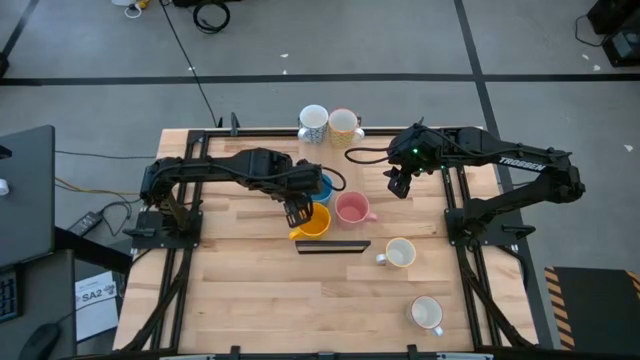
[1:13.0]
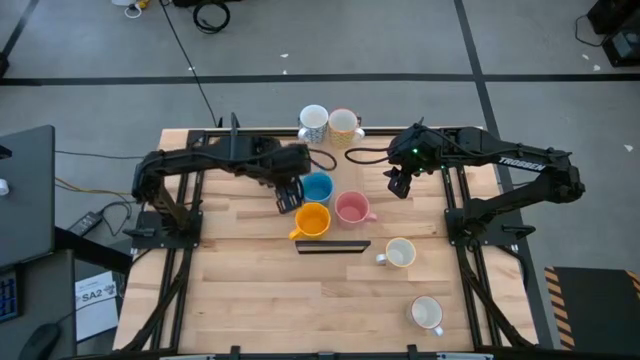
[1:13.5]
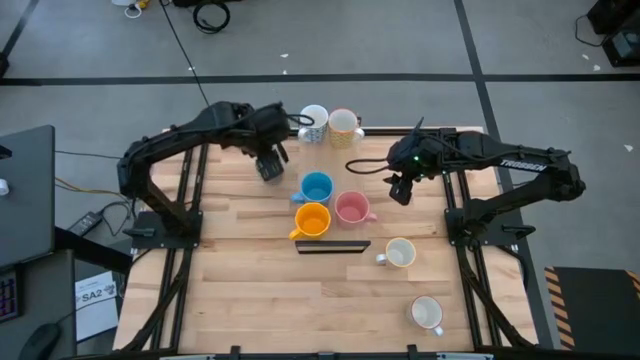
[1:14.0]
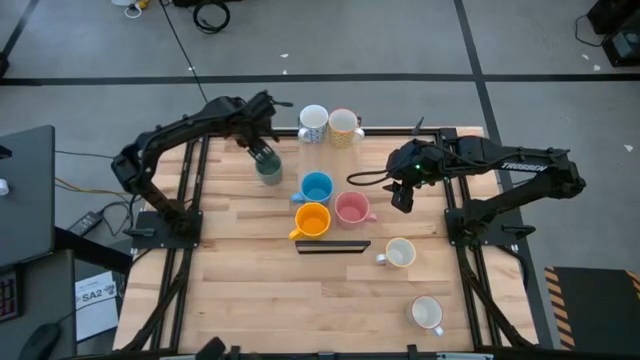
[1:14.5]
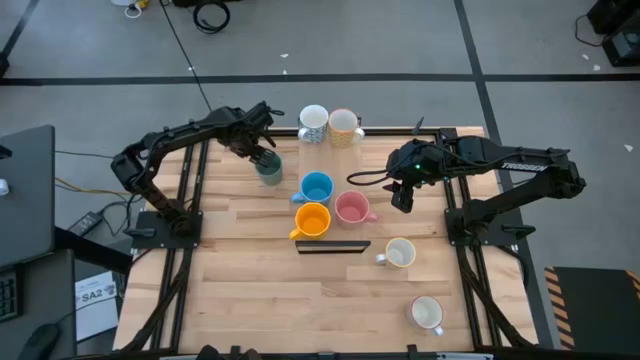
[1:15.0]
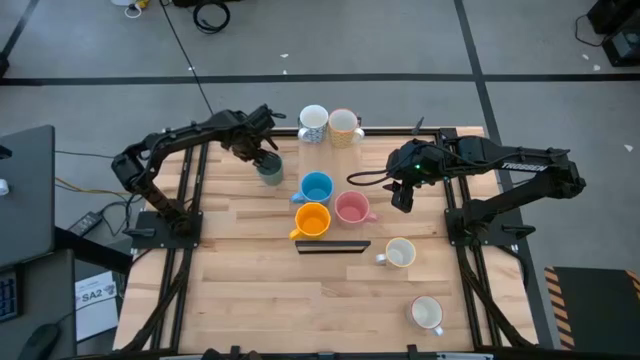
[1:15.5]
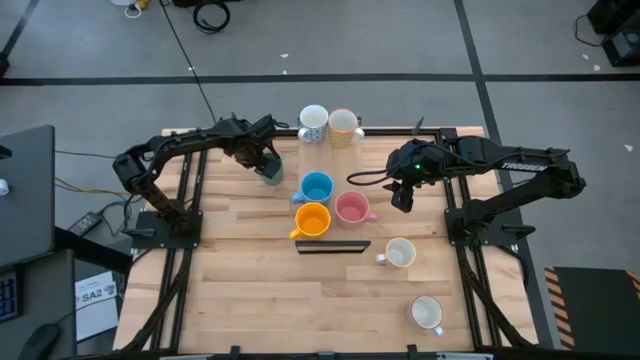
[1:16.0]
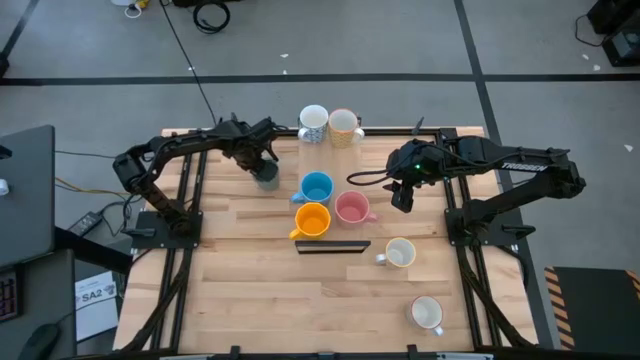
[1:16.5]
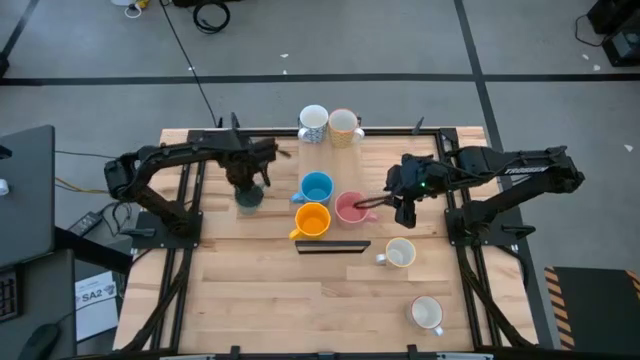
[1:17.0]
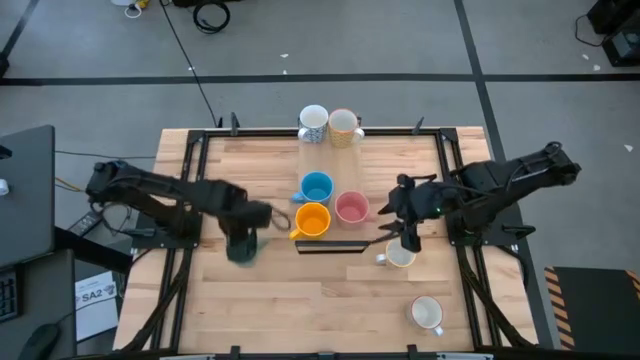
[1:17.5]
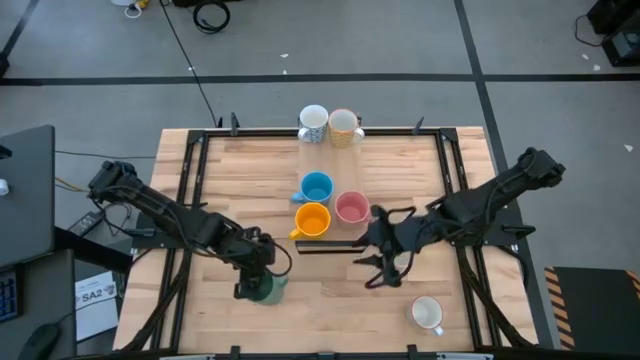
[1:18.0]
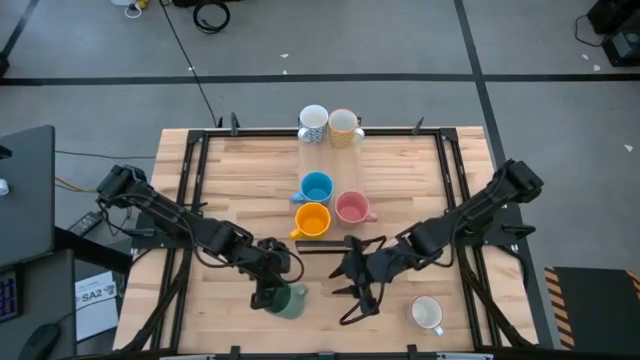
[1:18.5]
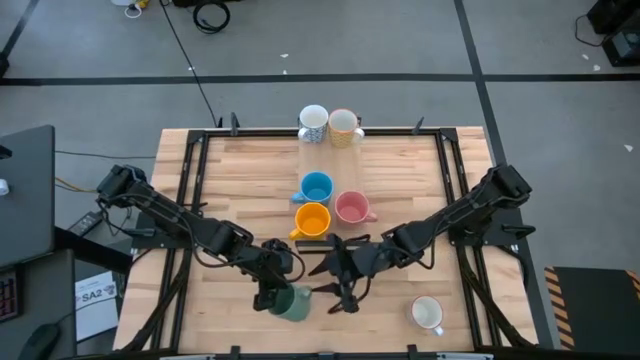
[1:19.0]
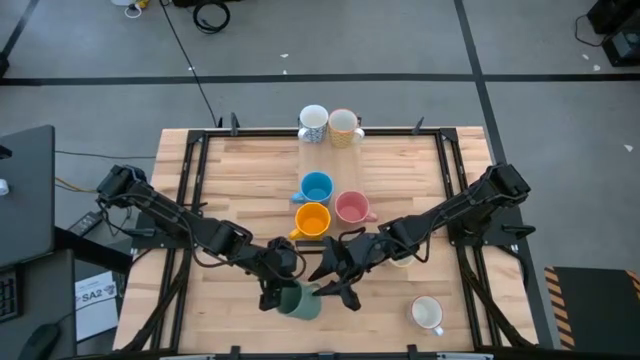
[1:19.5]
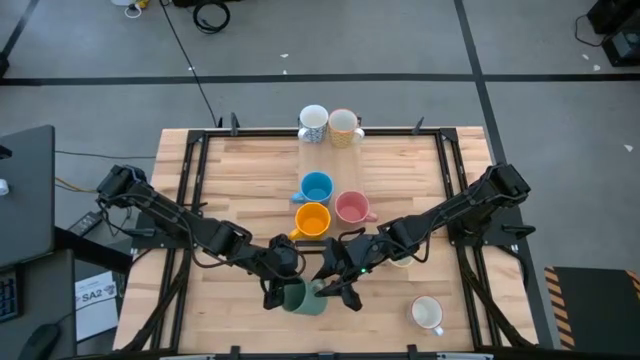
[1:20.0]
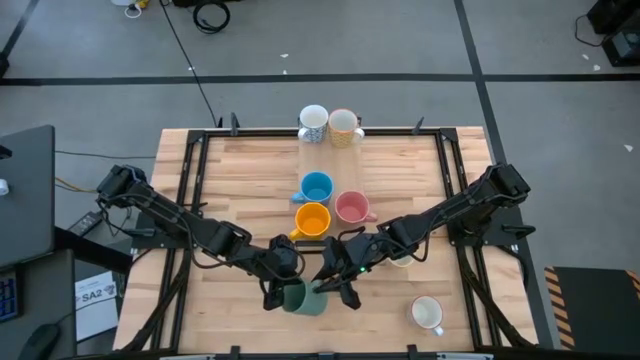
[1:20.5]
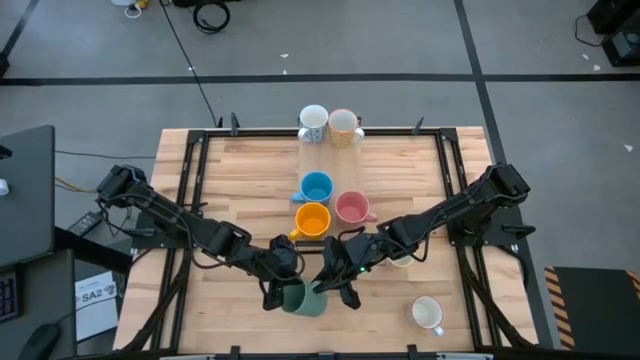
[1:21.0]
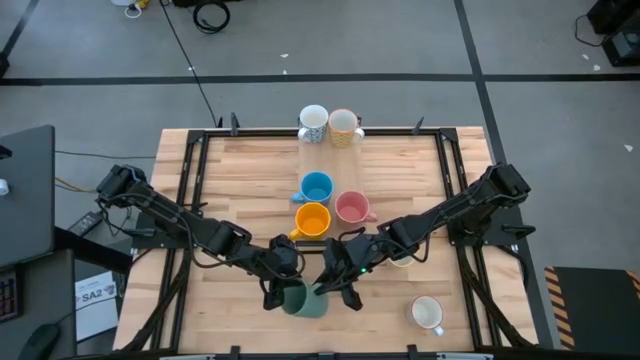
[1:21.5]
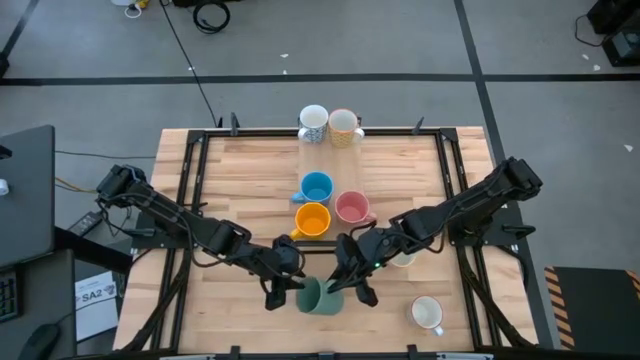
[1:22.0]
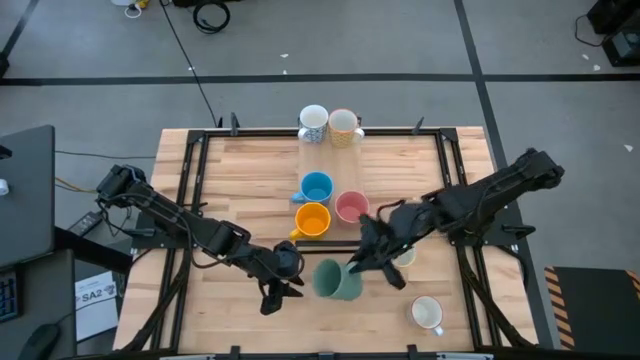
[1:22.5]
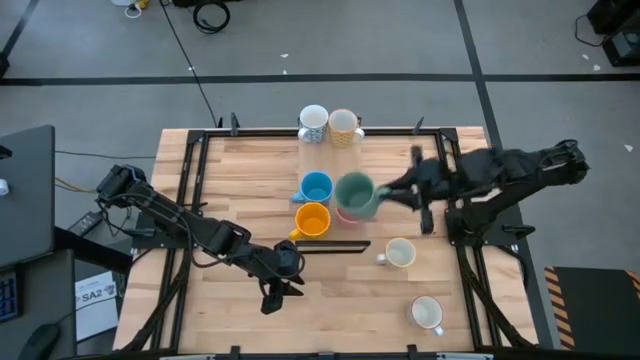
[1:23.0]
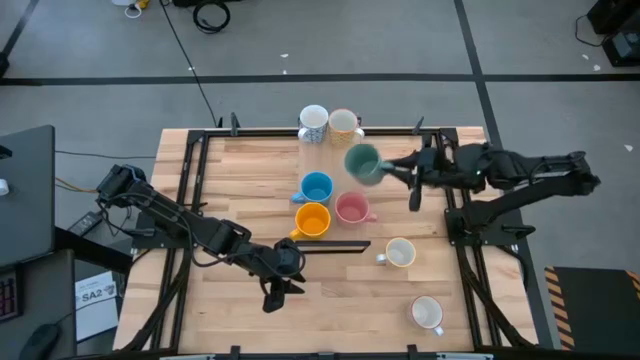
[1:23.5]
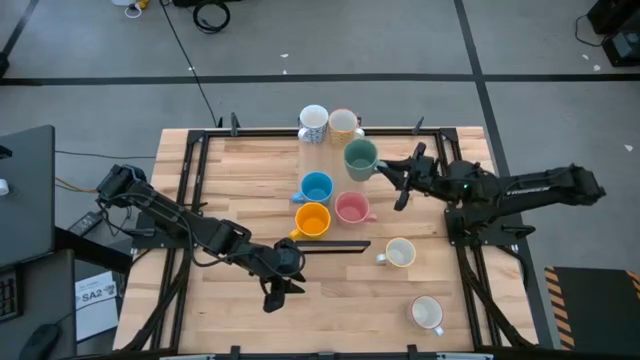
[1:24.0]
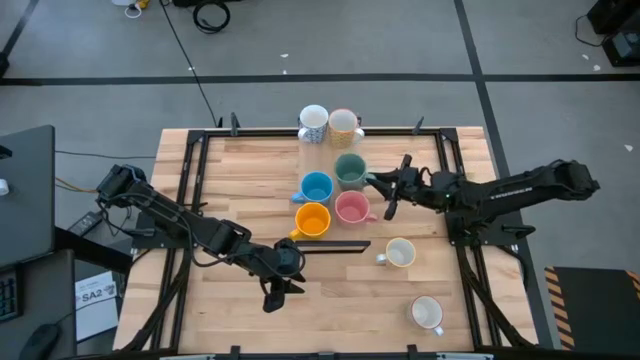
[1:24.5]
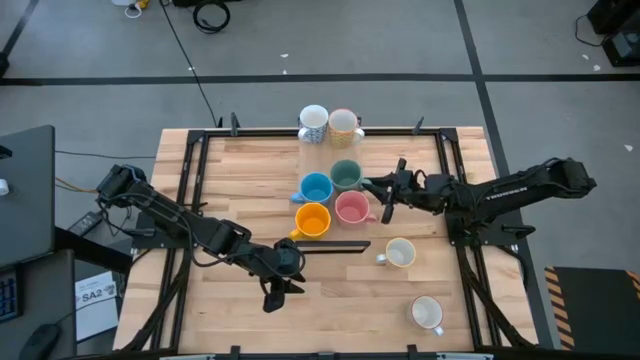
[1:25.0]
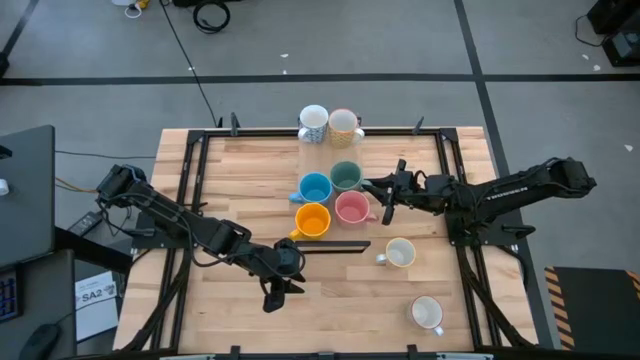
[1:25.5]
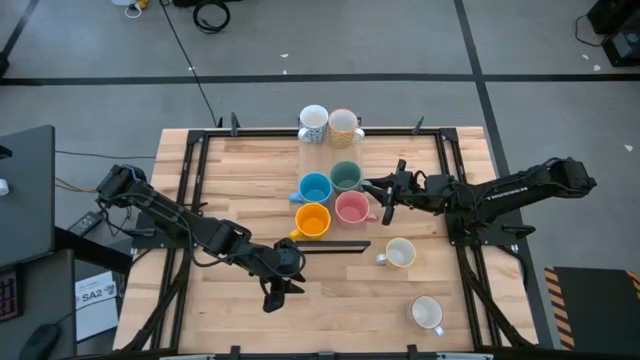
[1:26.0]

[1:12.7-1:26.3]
Task: Place coffee mugs
Put the green mug on the shelf

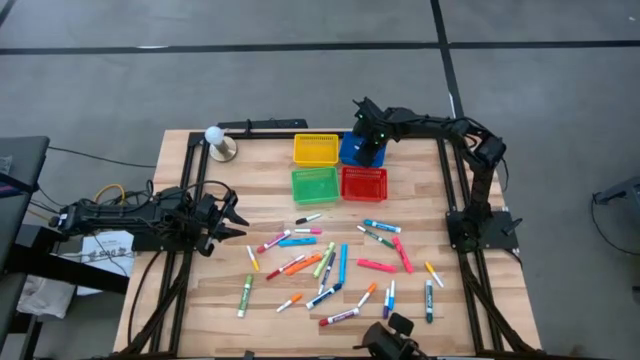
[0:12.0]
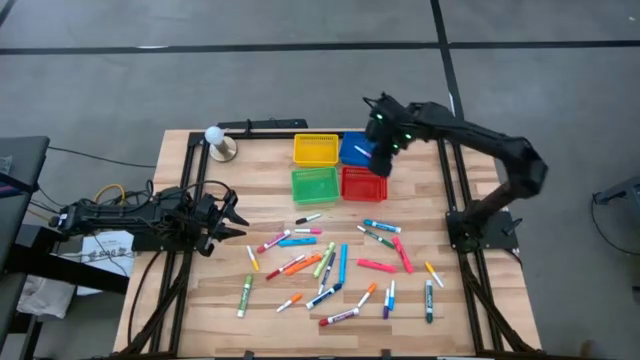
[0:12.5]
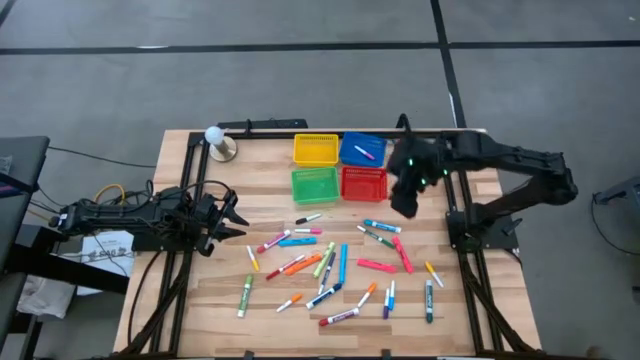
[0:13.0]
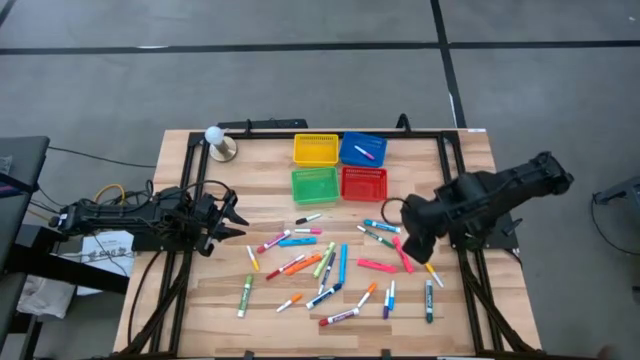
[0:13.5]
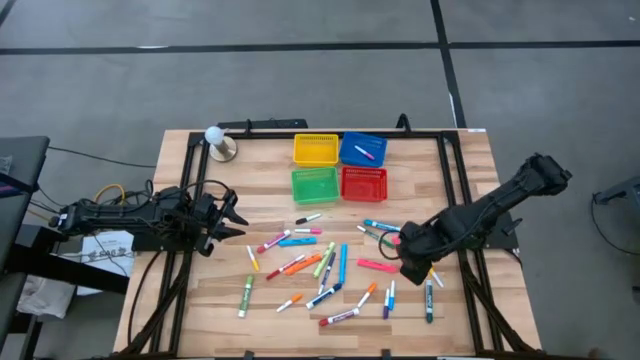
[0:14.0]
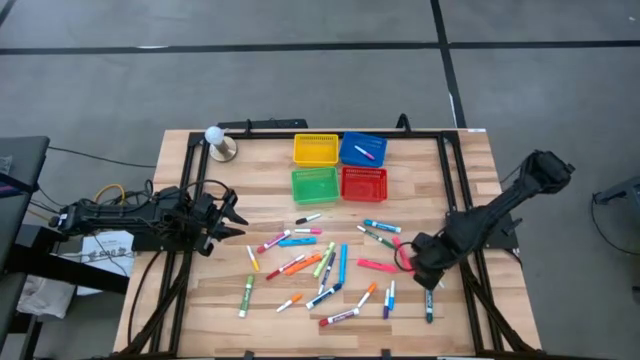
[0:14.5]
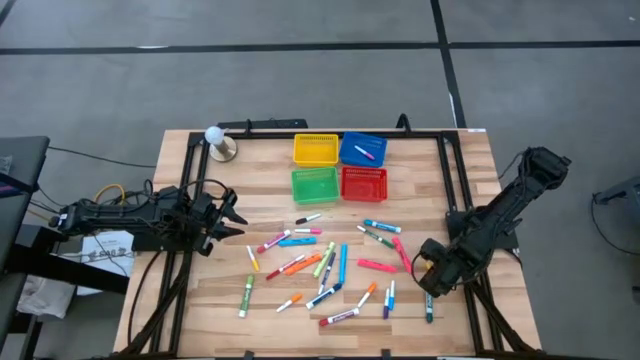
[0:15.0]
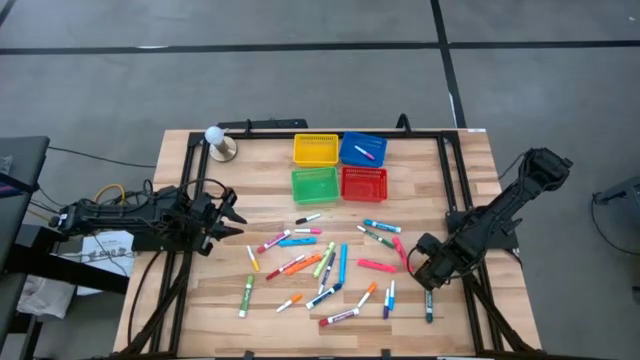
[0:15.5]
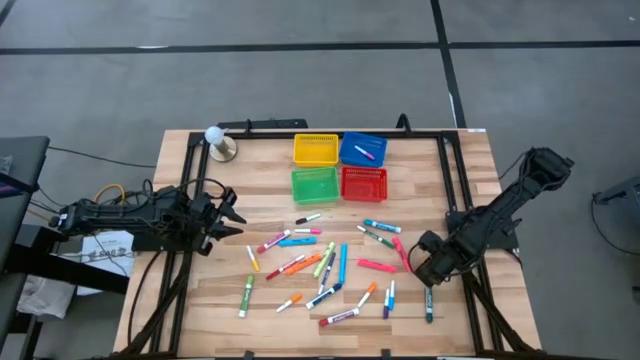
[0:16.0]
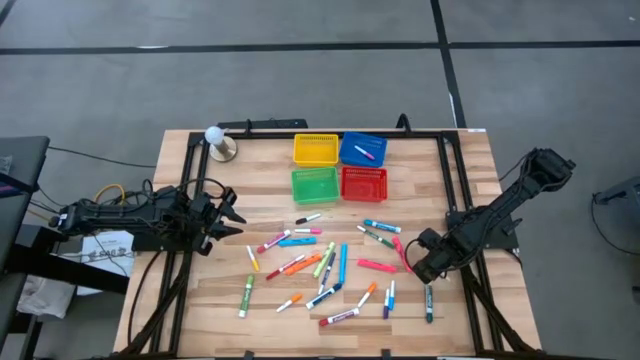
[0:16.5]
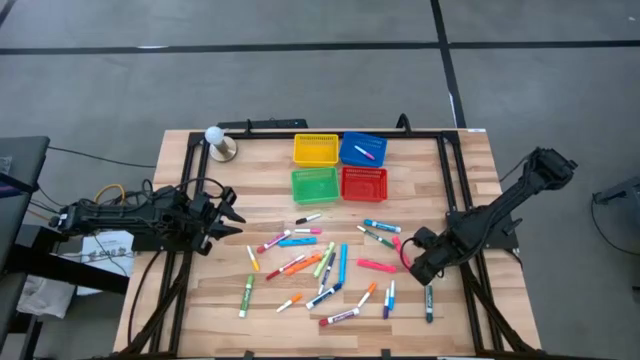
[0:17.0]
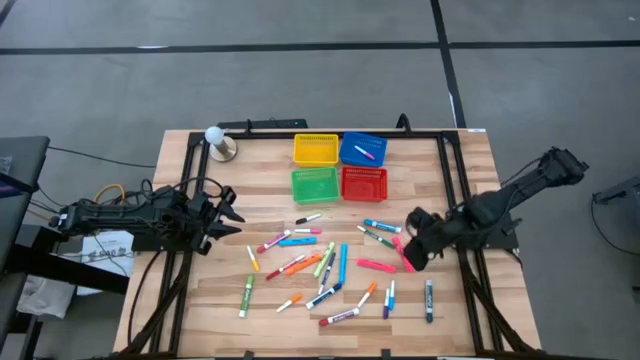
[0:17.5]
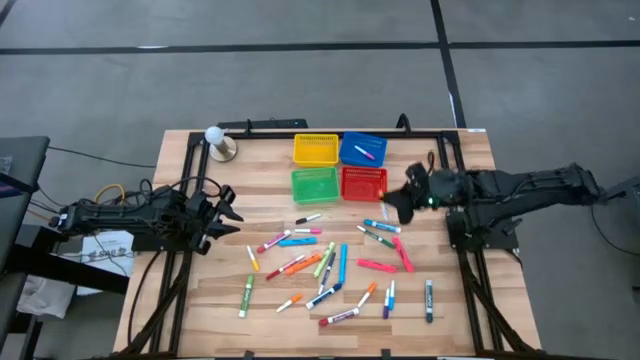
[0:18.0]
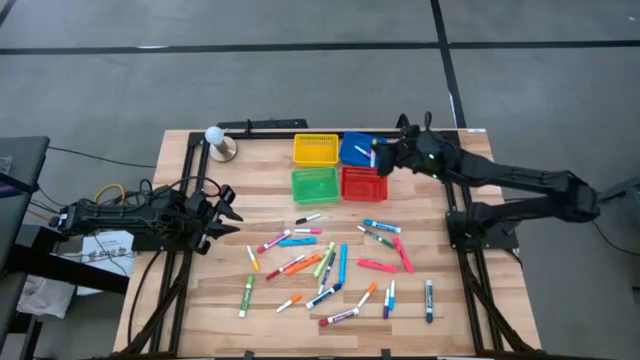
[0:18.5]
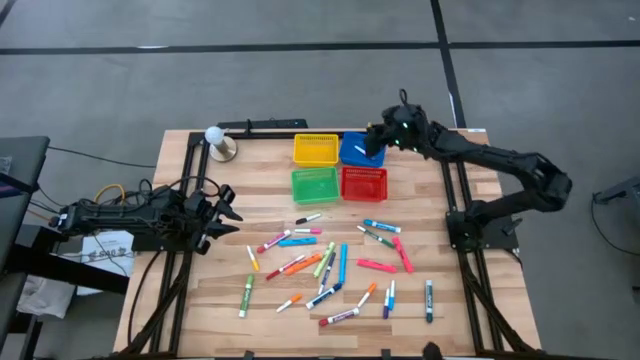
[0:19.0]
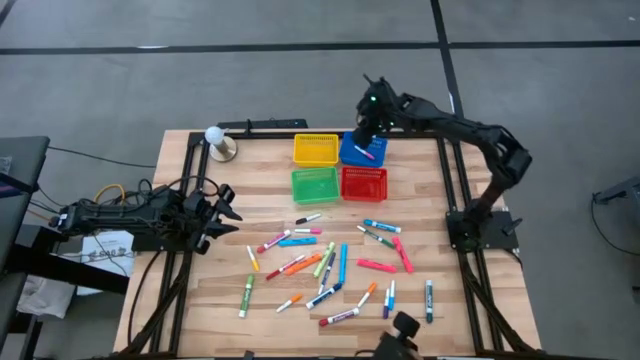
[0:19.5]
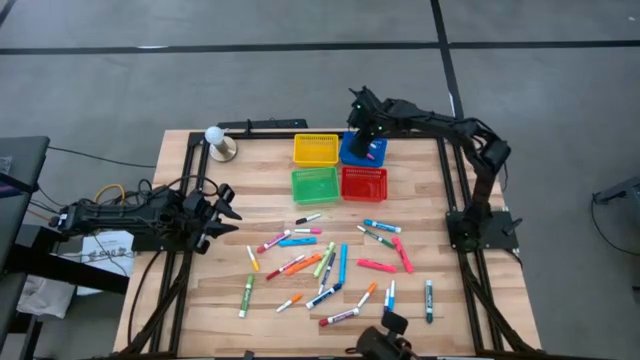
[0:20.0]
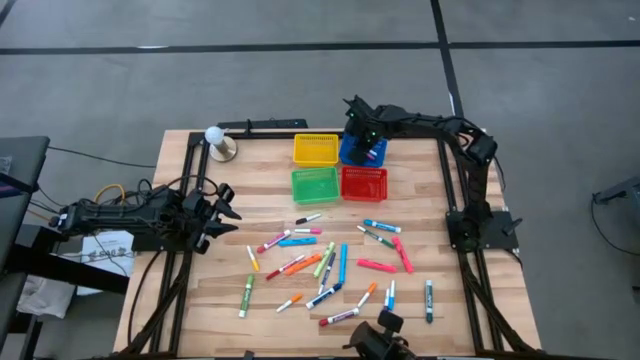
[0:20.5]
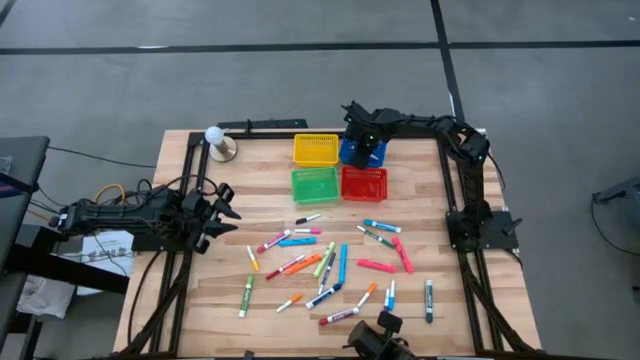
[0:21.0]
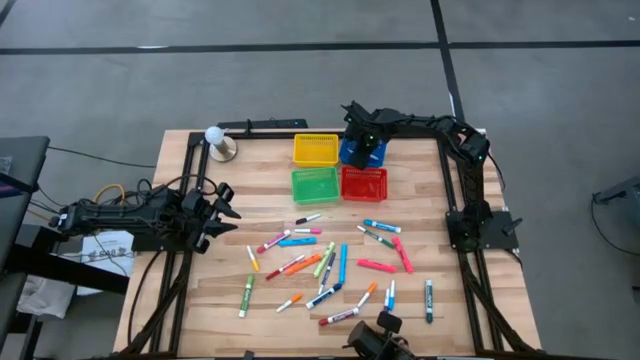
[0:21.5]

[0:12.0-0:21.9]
Task: Pick & Place Markers
Put the yellow mini marker into the blue bin
